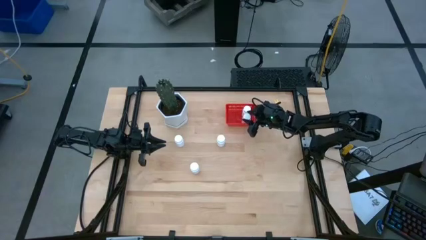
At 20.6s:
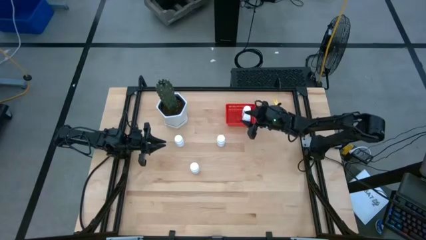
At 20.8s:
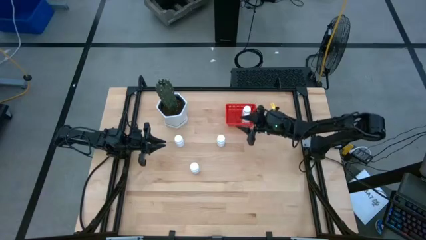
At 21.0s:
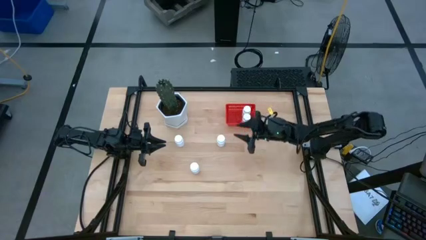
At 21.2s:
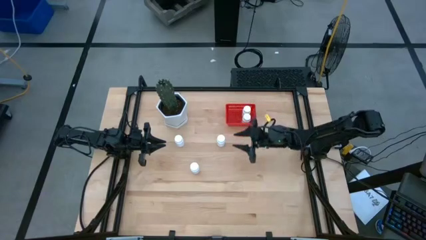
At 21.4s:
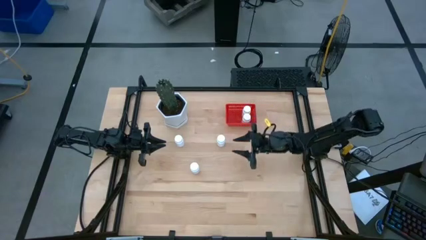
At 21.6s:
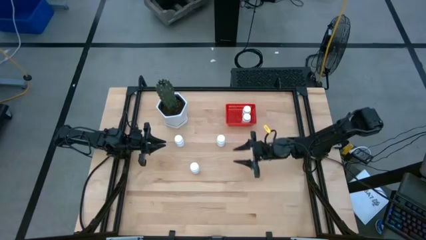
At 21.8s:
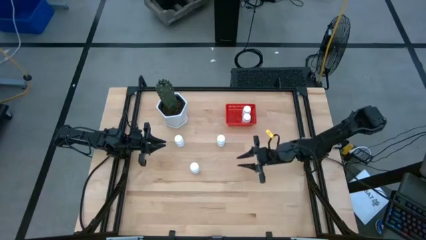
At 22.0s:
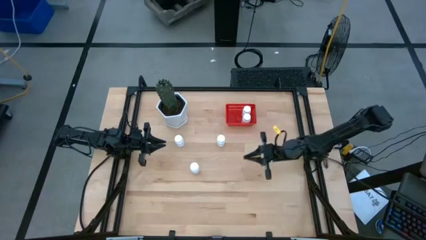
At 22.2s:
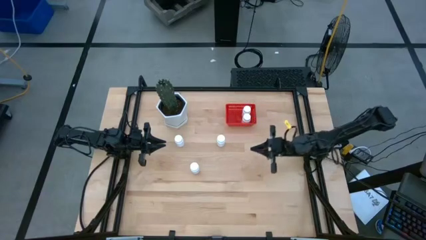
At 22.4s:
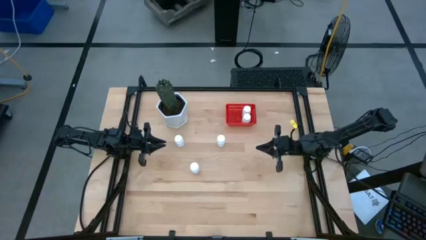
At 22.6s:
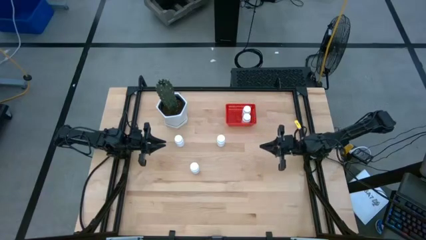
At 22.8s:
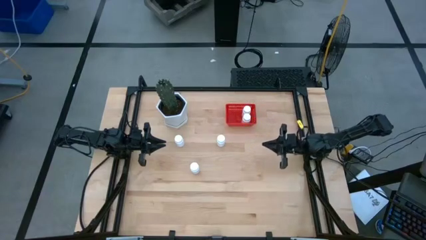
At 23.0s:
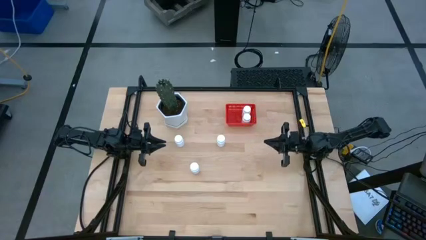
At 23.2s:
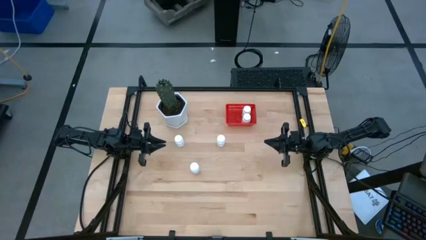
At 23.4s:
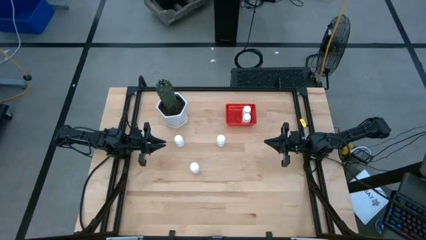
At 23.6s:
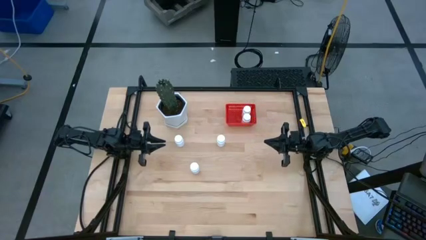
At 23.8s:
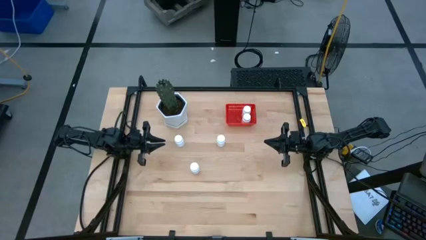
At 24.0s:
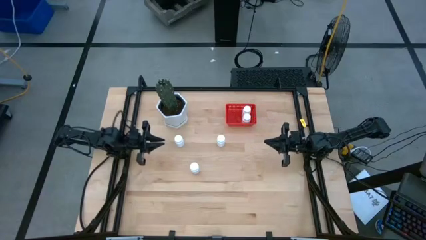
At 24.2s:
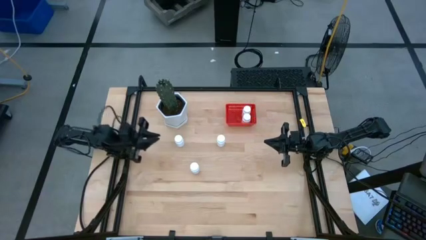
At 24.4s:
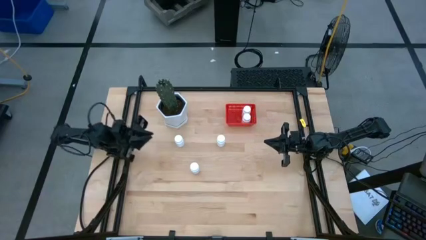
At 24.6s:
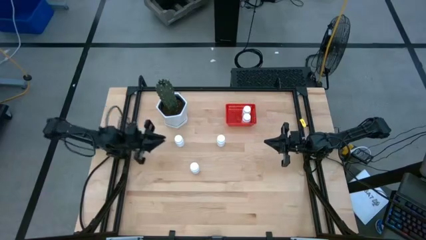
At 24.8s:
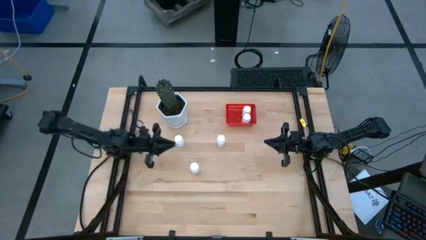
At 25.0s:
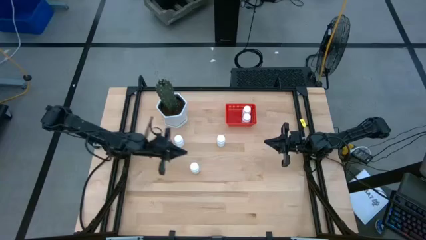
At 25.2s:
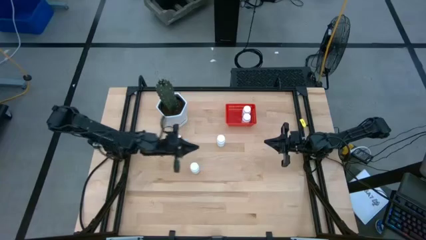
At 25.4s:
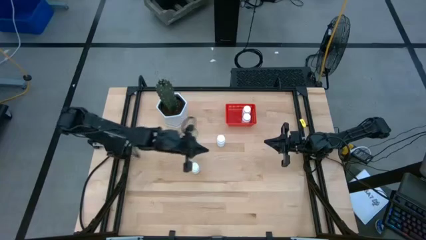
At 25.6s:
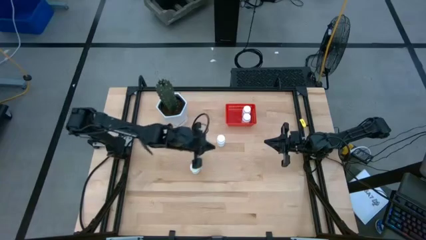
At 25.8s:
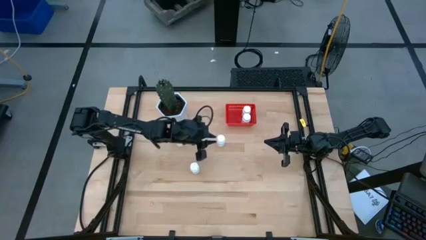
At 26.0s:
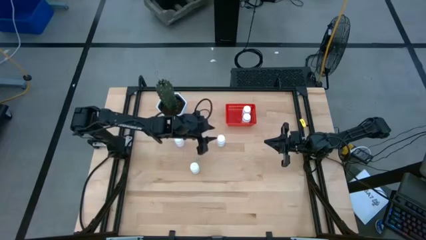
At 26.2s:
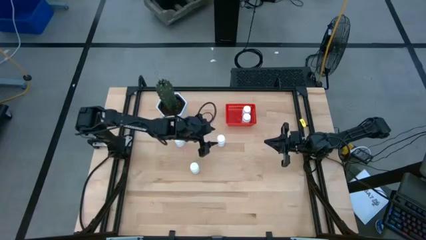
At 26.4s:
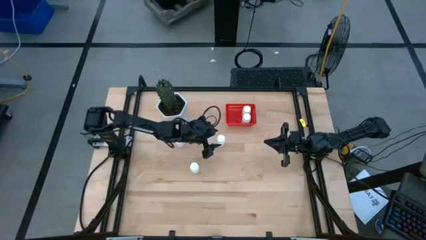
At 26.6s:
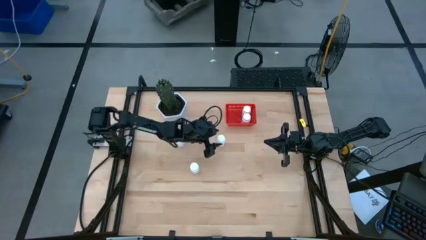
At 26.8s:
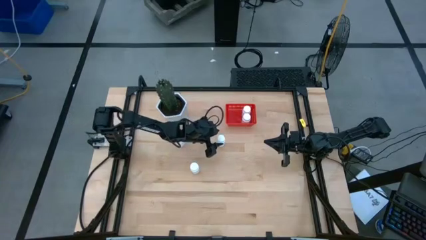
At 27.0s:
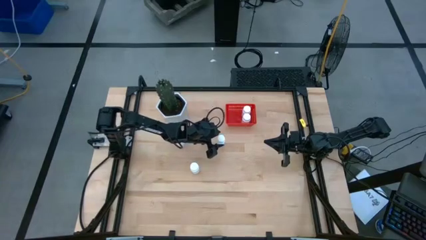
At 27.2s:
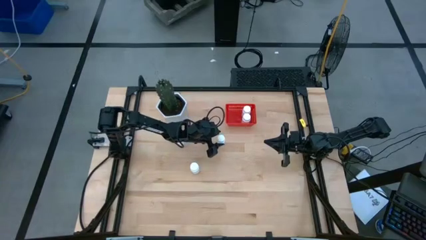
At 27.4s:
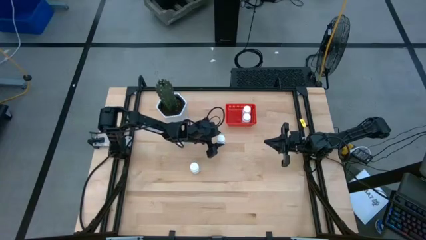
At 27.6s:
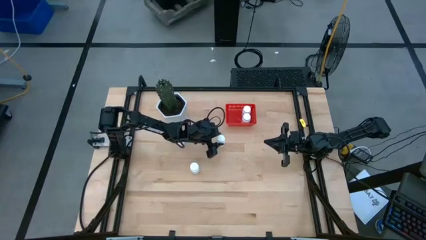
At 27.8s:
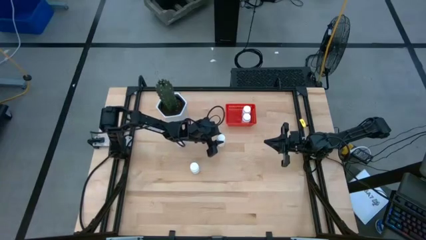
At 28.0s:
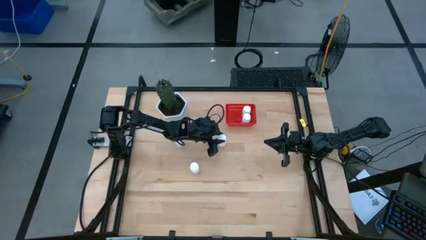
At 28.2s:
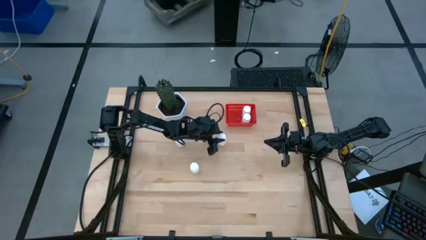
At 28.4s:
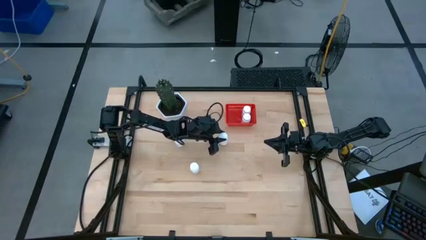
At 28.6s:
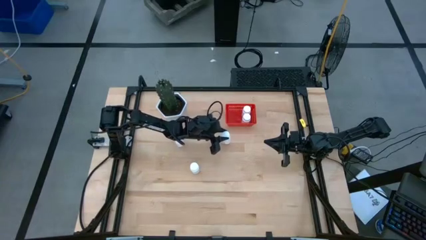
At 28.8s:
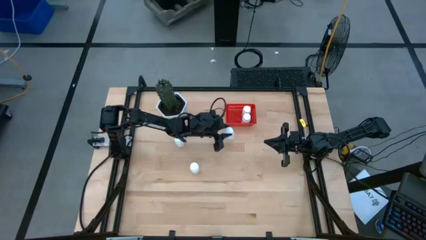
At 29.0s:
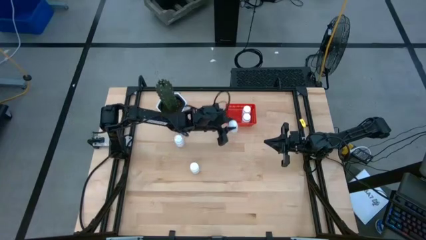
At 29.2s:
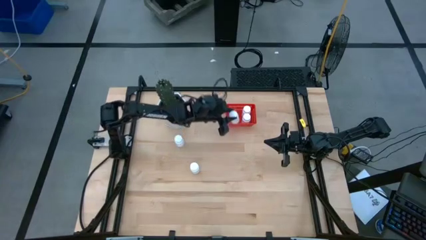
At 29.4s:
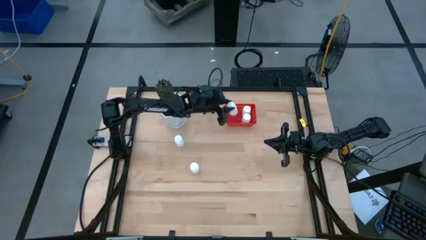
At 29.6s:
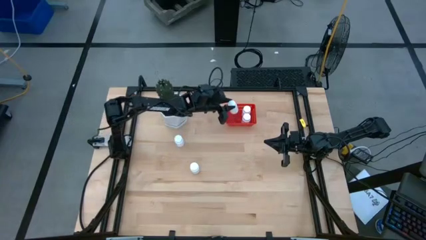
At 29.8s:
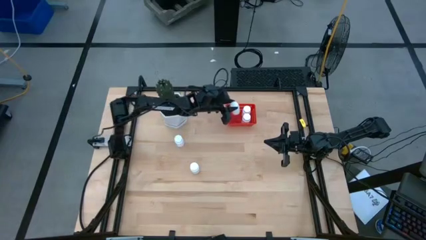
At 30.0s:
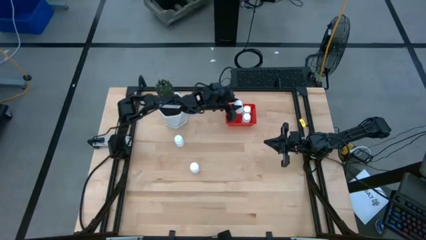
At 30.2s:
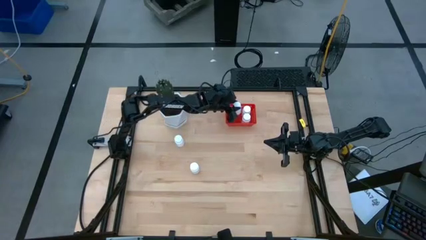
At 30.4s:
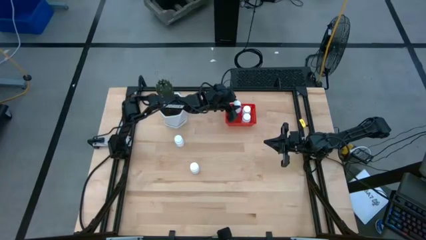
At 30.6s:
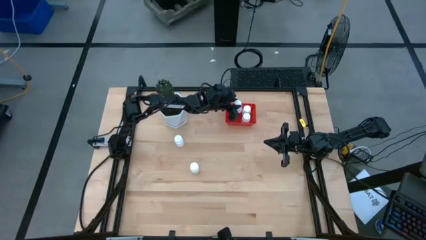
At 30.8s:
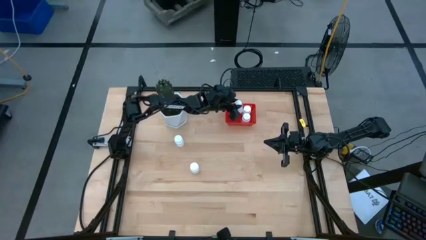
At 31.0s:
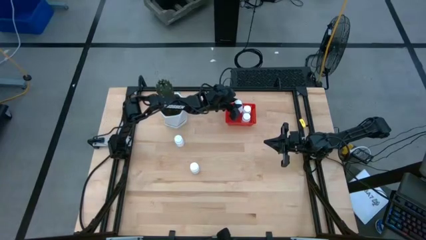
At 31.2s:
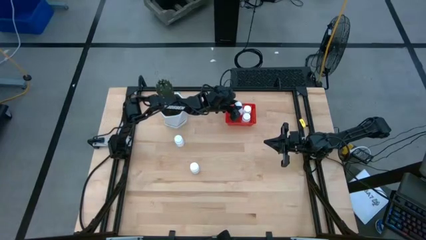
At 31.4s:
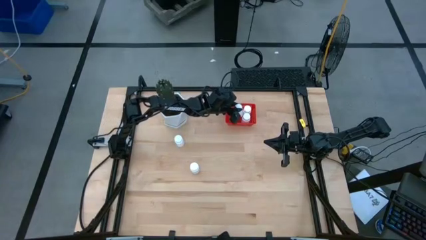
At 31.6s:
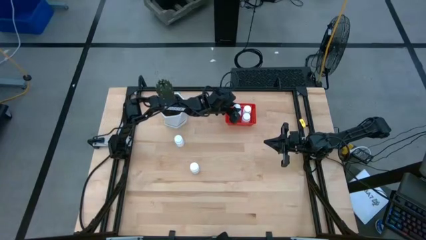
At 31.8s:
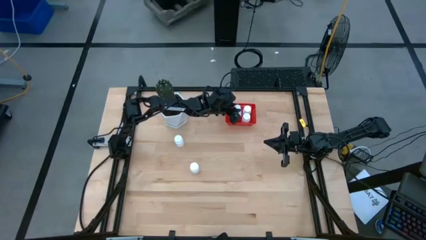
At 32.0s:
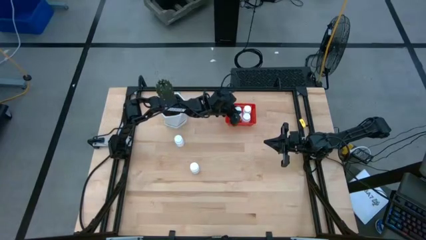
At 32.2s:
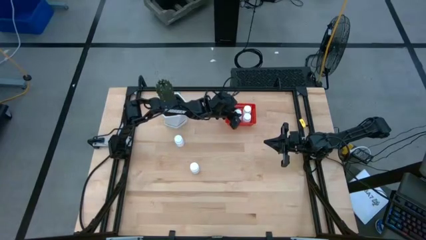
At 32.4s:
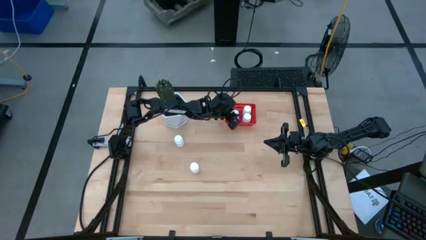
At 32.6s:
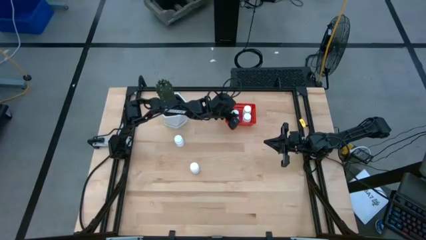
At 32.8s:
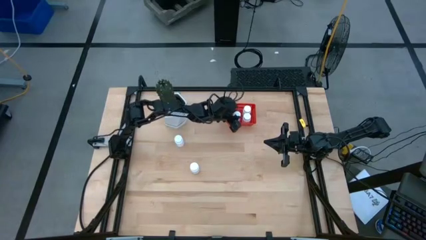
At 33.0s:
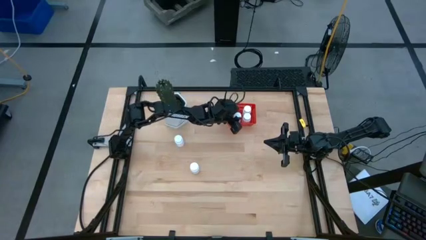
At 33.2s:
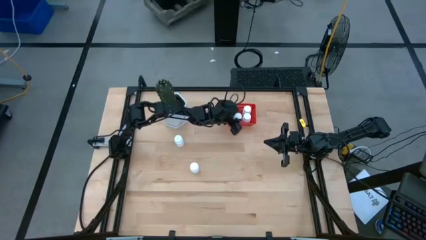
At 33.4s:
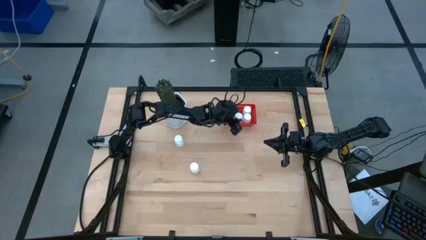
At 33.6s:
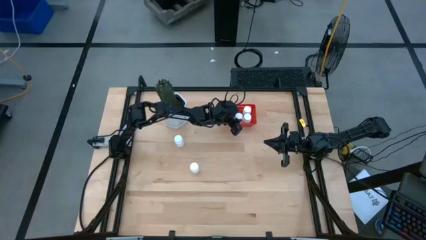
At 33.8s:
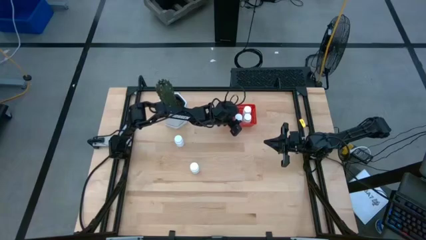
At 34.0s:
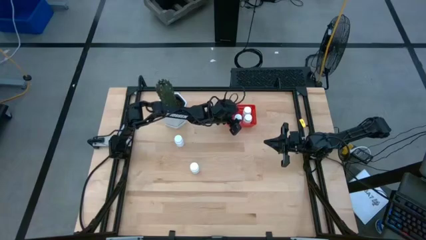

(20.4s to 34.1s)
Task: Pick and place pill bottles into a basket
Put the white pill bottle into the red bin

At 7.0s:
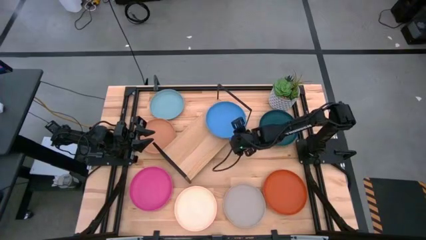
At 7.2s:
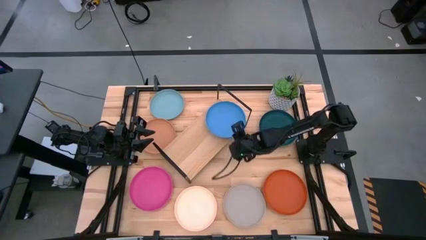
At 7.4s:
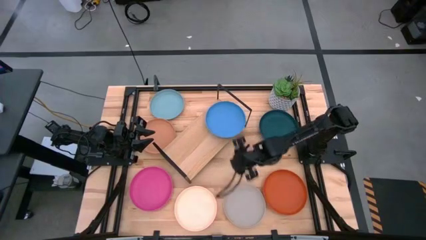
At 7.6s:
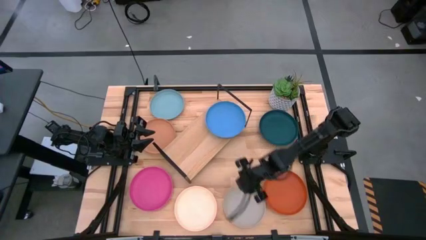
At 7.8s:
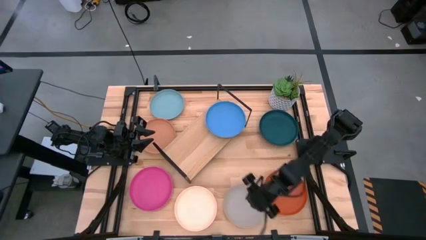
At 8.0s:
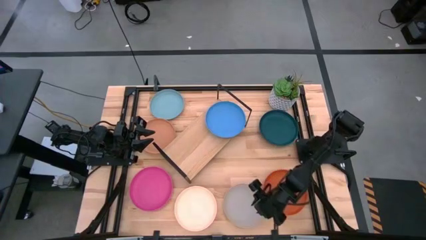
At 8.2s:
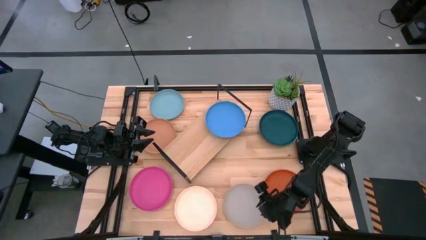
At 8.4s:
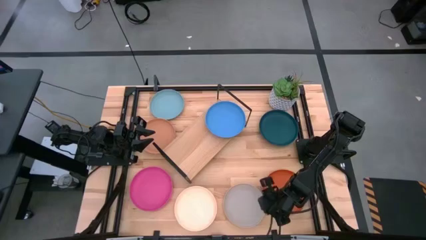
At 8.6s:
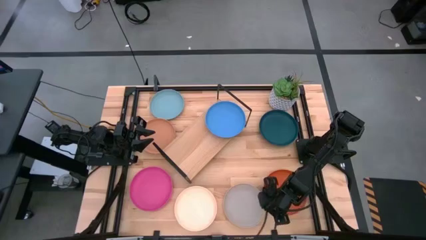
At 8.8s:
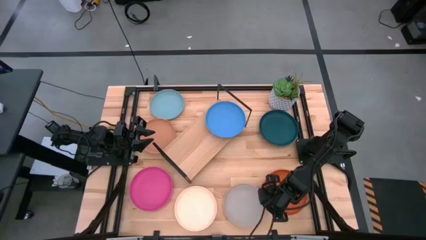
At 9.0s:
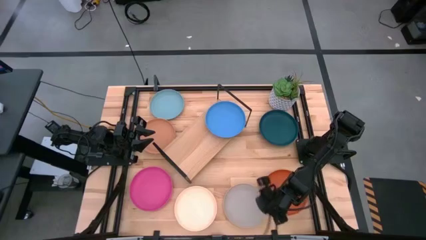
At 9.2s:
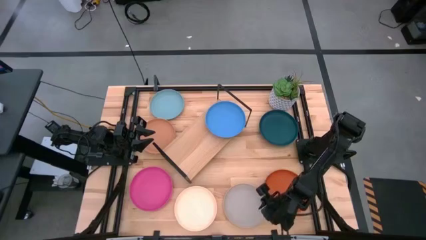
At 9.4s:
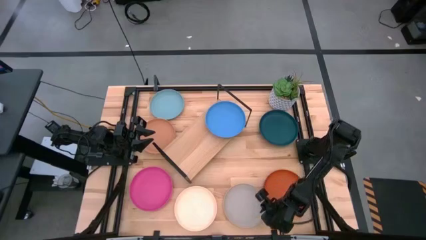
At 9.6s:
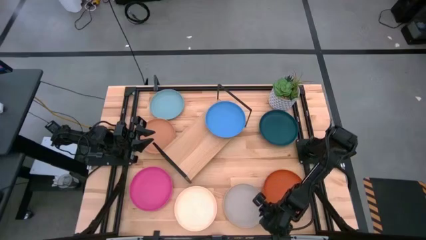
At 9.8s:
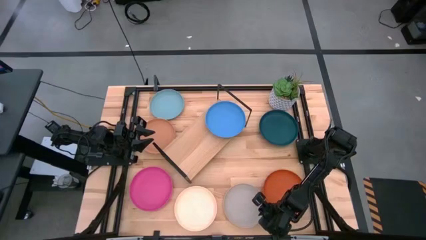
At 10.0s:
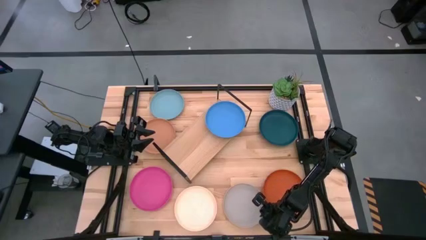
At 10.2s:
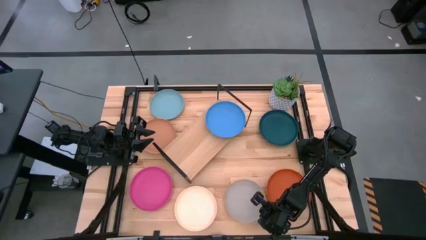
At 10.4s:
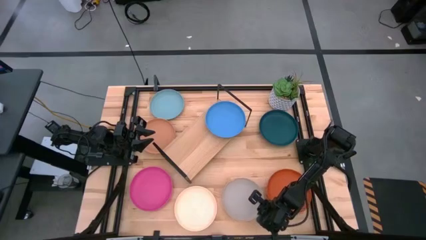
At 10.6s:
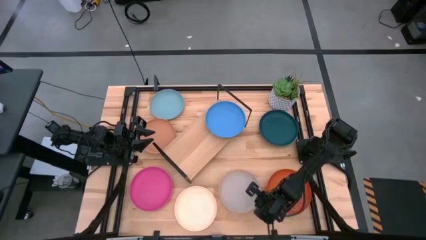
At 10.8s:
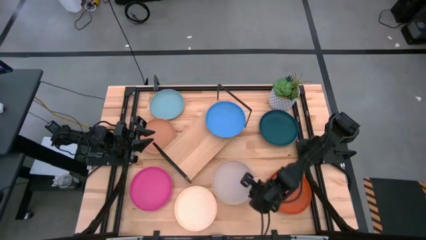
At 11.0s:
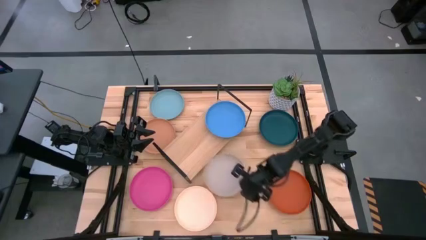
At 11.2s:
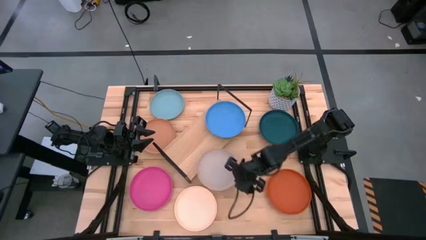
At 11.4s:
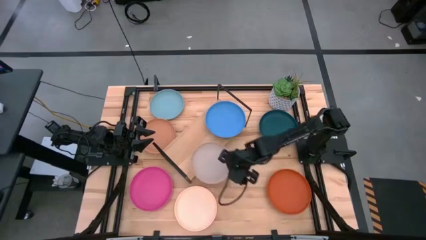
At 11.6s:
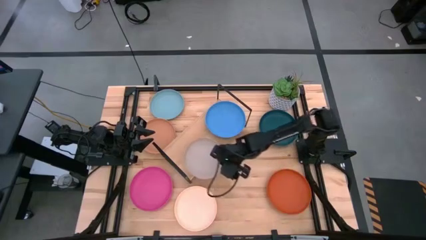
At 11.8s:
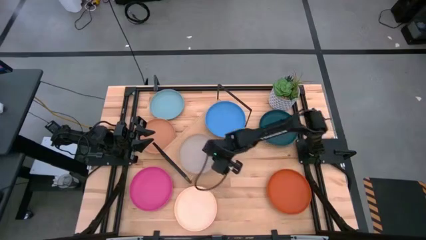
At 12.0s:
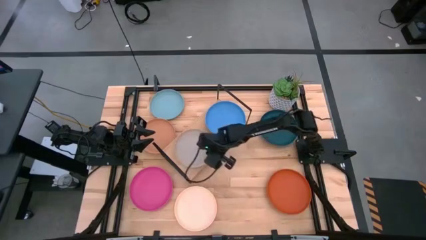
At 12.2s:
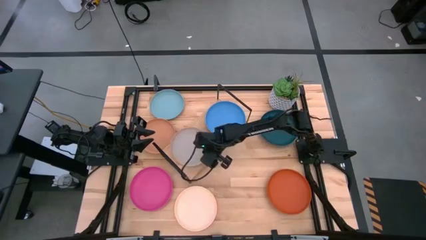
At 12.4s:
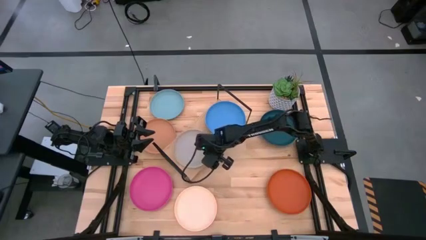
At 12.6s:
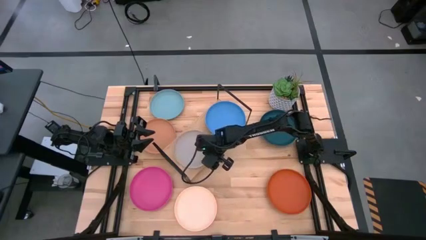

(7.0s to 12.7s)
Task: Place and stack plates onto a shelf
Put the gray plate on the shelf
